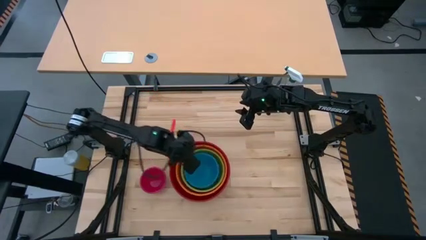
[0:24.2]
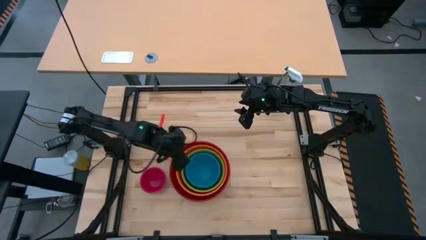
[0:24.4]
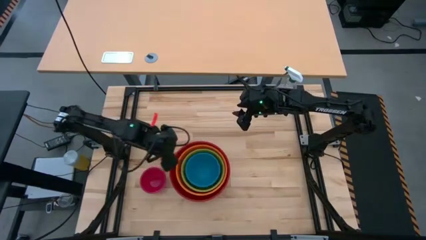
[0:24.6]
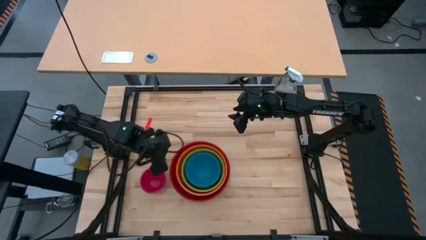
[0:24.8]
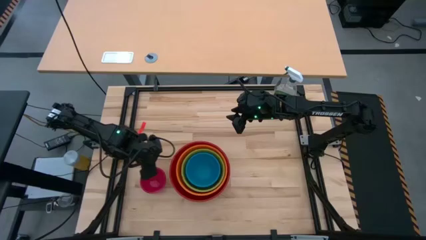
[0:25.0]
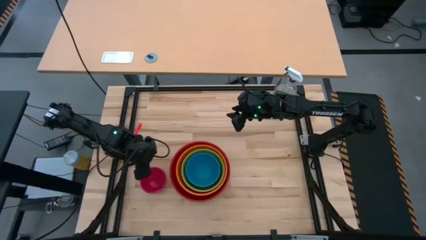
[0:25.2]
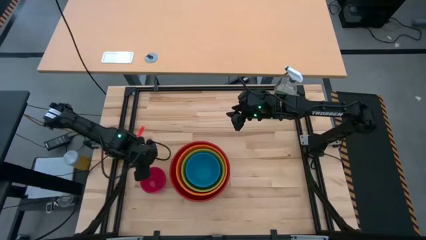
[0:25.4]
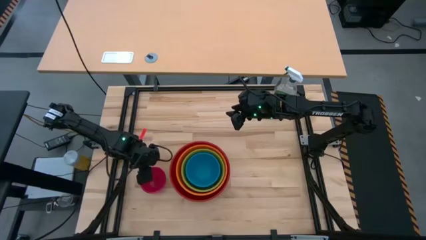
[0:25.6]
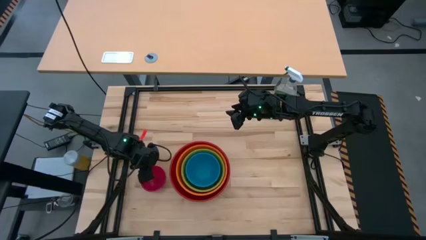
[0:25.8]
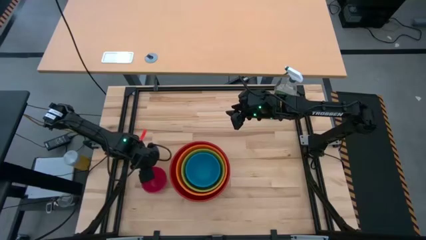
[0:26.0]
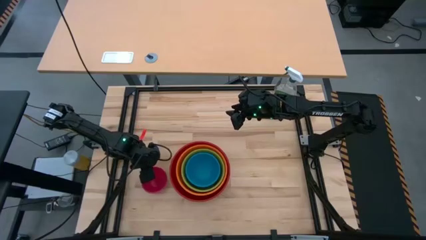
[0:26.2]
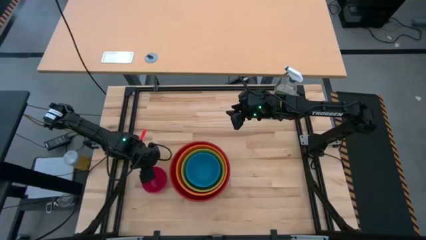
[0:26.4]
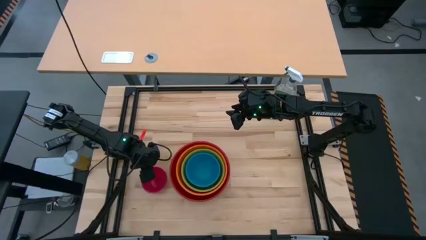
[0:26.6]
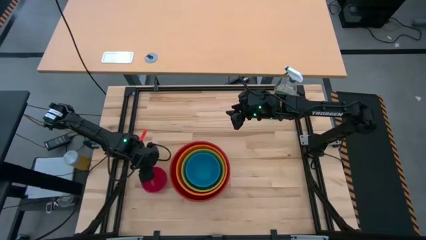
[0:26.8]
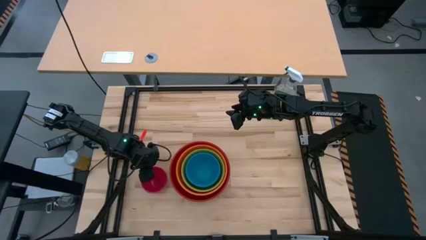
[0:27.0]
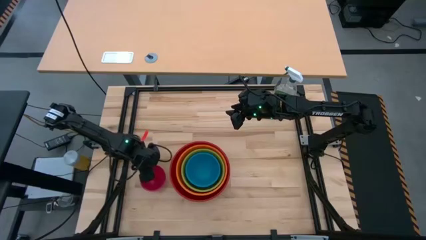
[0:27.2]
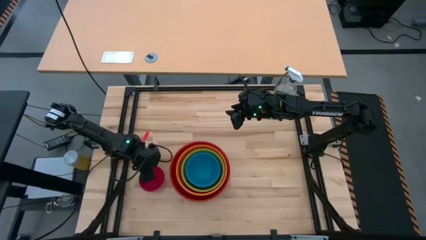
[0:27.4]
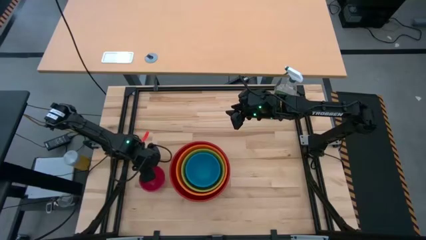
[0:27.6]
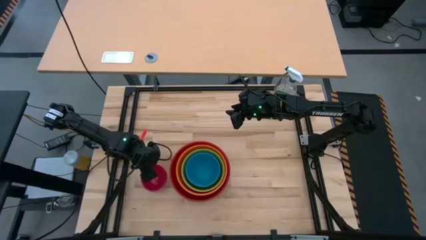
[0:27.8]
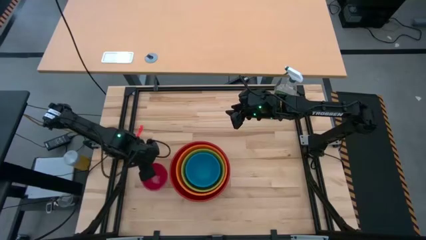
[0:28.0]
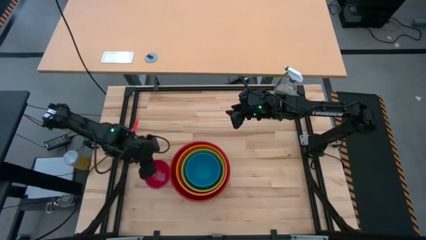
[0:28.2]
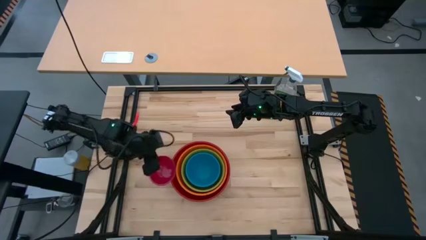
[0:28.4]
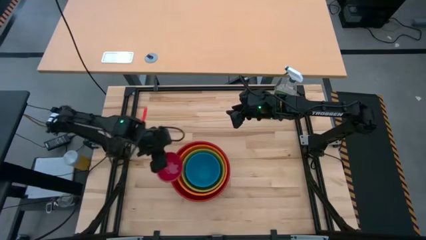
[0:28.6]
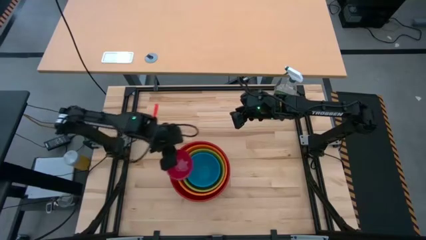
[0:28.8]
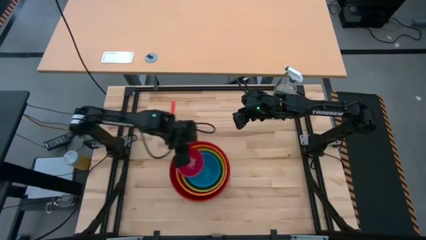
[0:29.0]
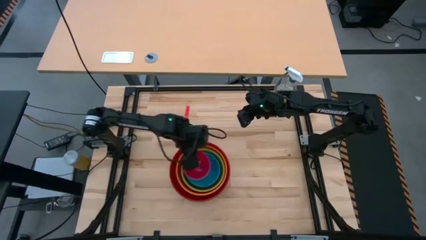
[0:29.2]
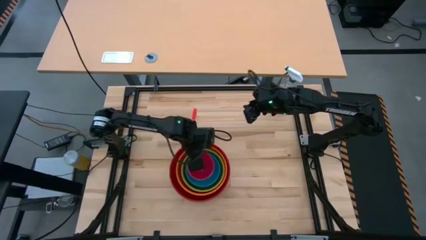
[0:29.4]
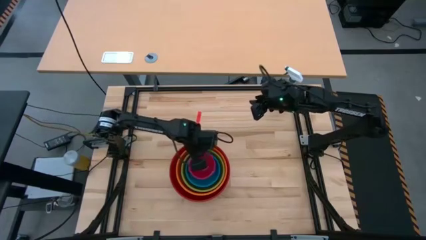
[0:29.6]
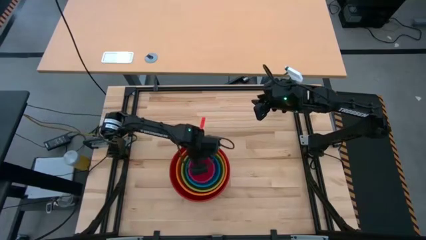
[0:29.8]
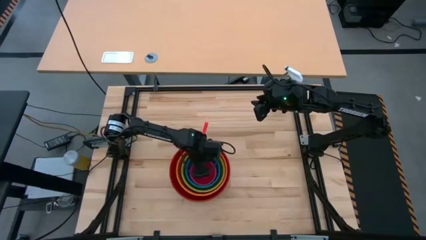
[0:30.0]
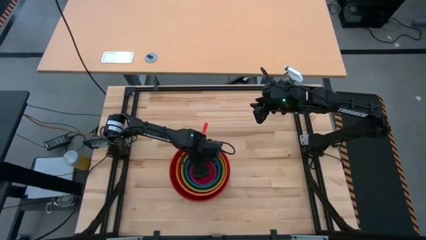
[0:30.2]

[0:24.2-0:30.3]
Stack the pink bowl on top of the blue bowl

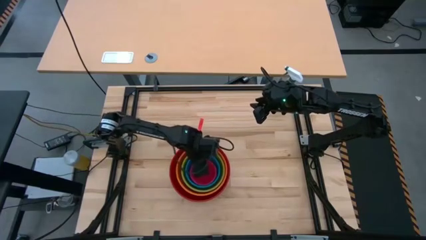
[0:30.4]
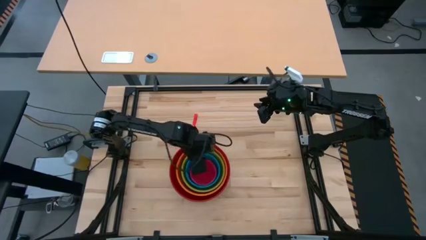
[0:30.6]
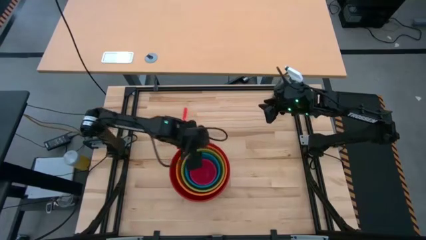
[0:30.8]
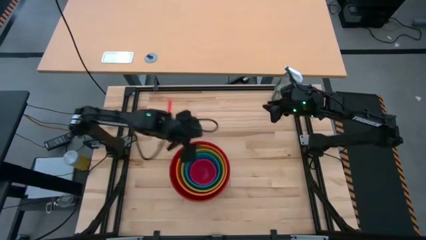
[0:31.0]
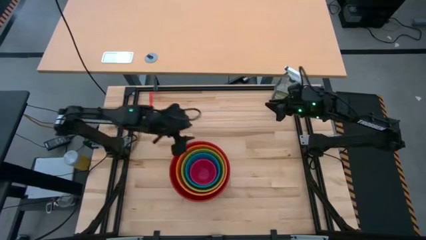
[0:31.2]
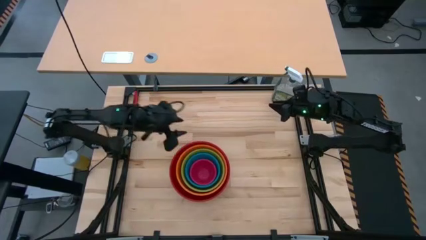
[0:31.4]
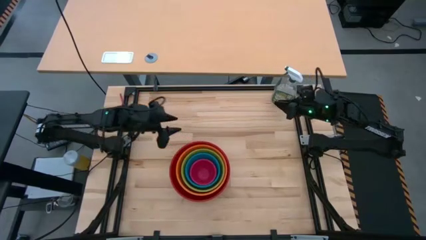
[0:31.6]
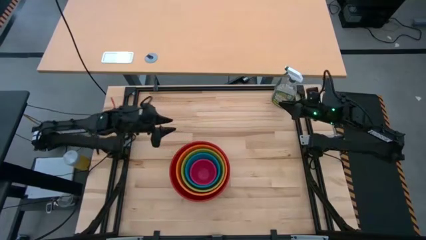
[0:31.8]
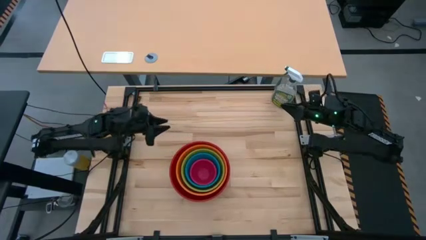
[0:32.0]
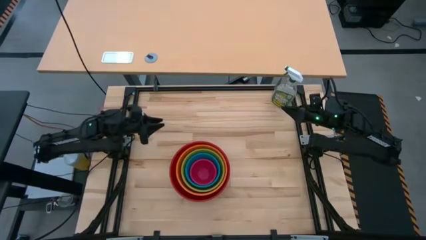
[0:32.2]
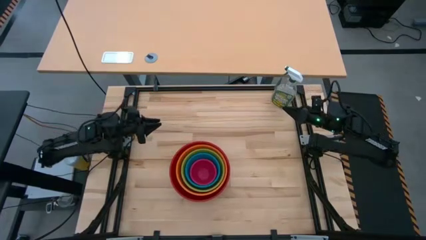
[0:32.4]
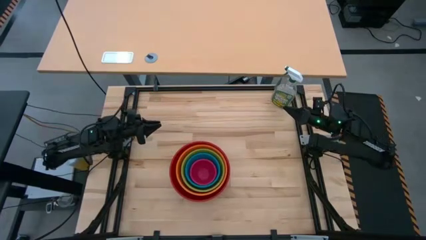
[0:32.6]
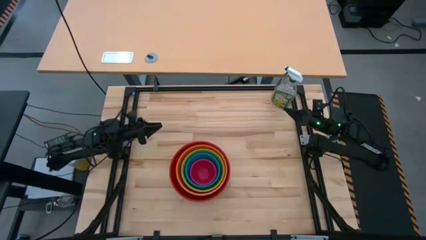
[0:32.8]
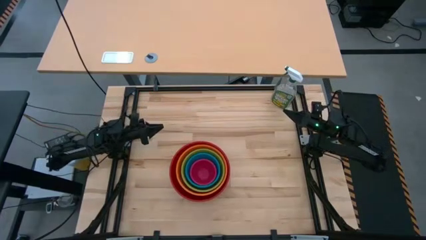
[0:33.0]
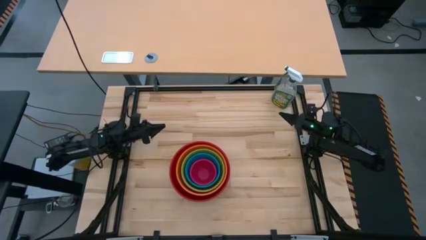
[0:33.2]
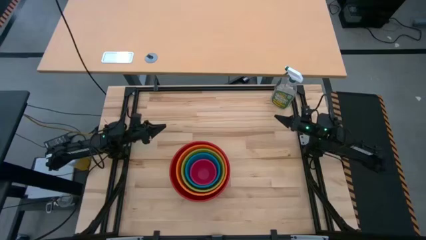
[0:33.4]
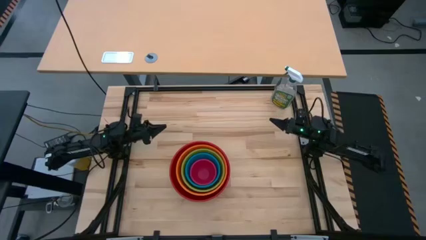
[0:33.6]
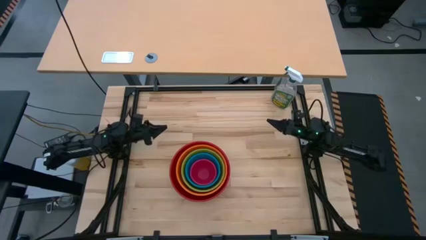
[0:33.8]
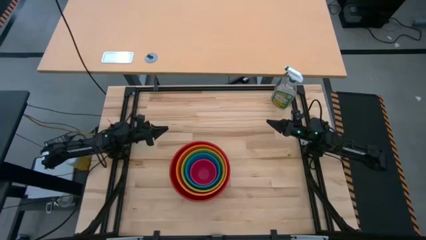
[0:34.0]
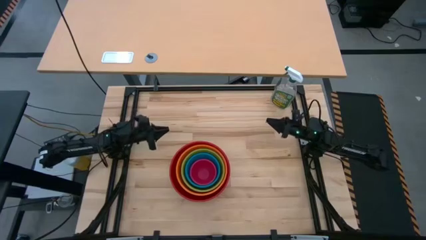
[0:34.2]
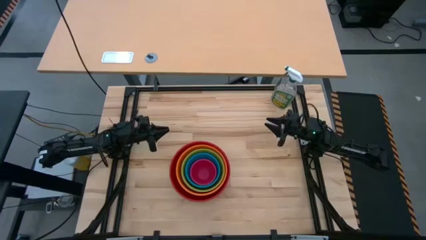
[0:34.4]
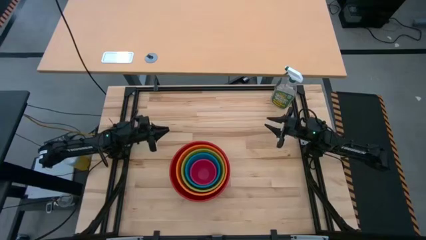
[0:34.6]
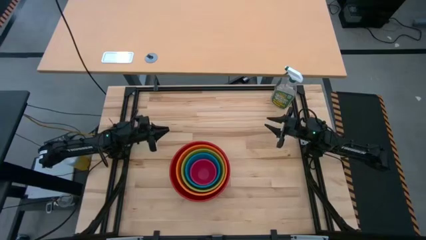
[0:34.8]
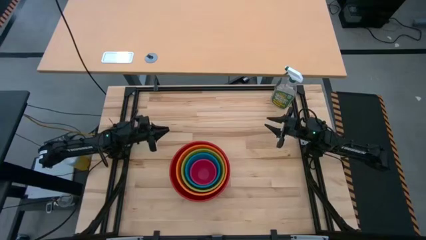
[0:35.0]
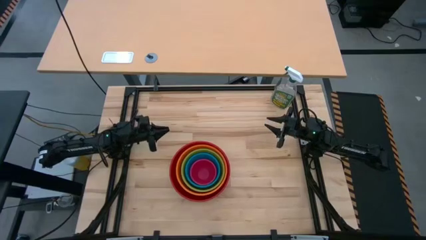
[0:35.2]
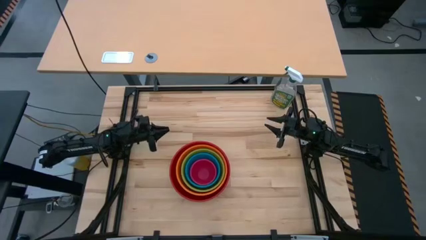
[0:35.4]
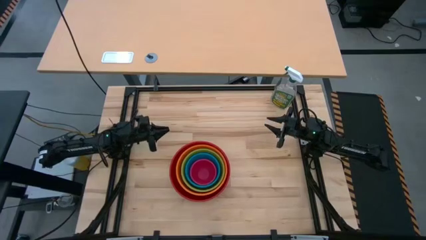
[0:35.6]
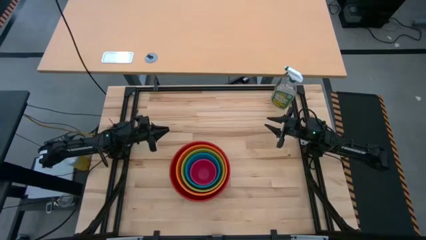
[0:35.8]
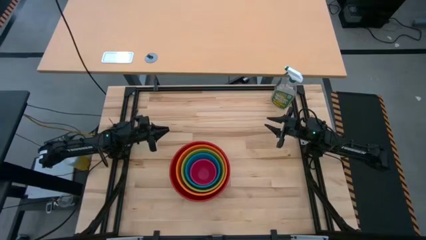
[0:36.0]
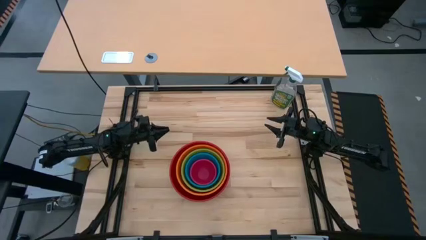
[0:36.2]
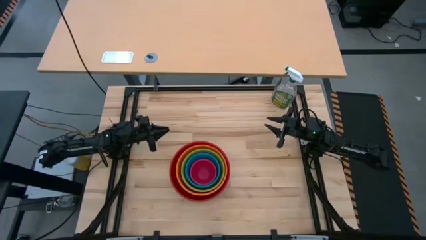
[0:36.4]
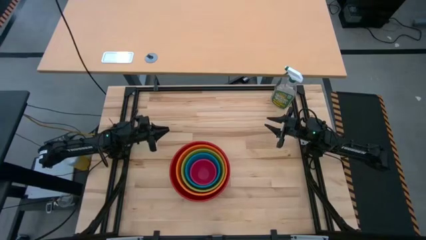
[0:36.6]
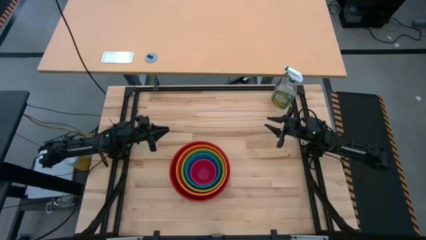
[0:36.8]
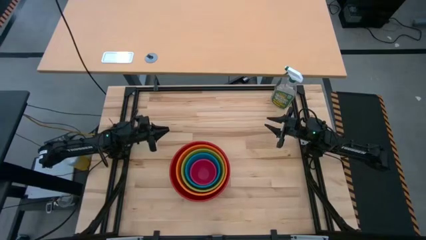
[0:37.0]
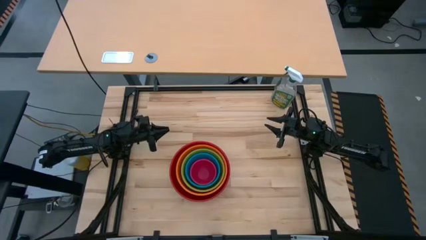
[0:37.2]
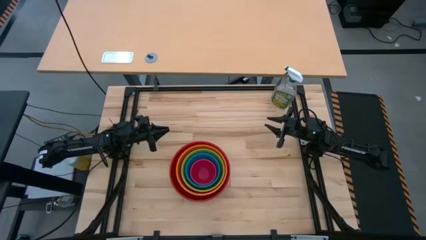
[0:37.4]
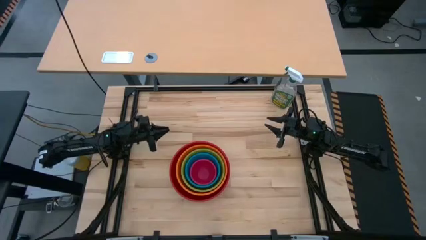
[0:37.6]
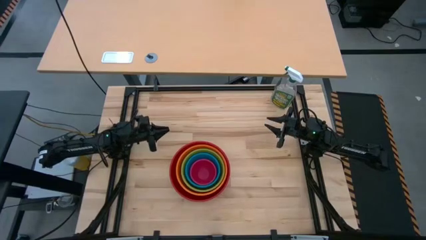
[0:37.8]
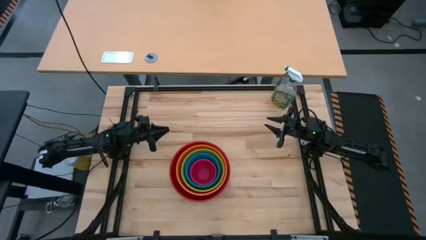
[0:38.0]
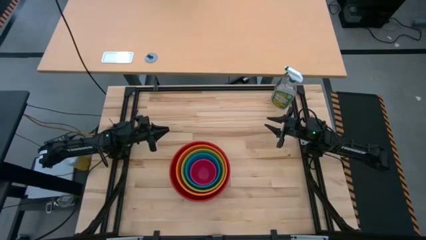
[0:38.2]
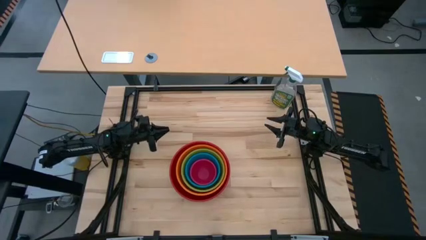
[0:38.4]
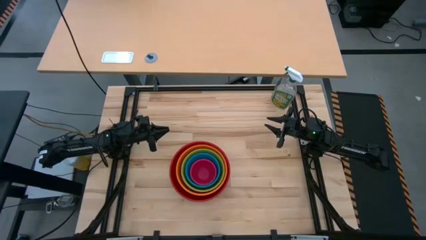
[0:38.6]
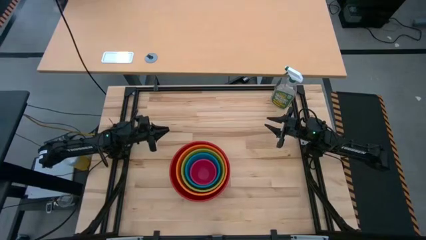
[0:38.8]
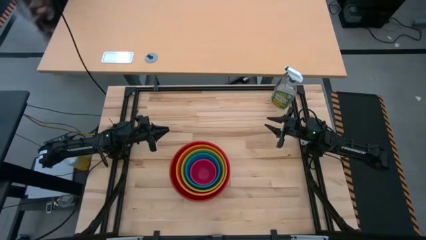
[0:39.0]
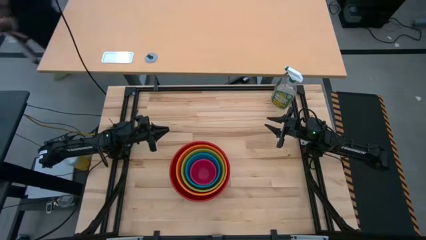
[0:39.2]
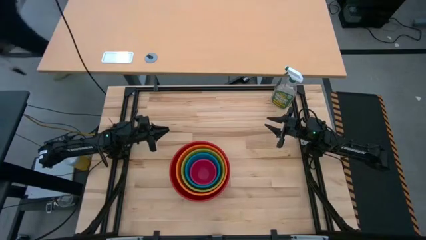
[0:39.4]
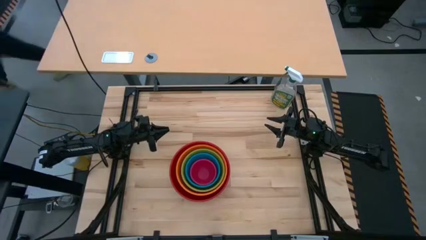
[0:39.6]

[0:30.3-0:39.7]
Return to Home Position
